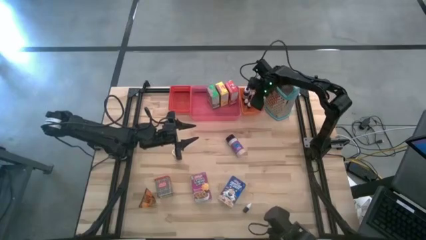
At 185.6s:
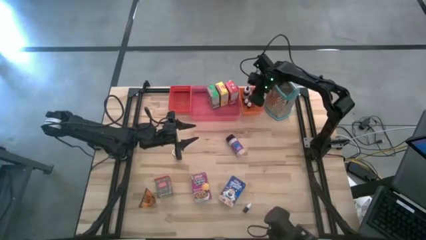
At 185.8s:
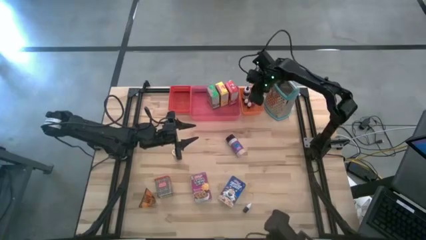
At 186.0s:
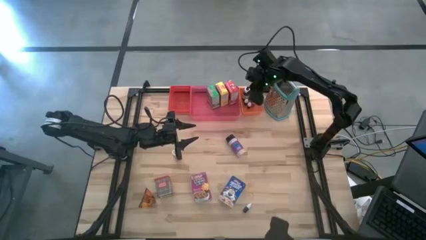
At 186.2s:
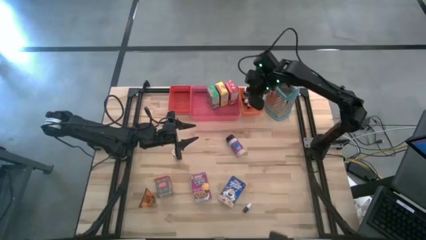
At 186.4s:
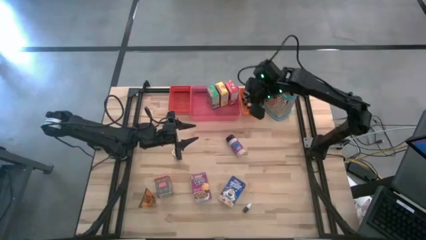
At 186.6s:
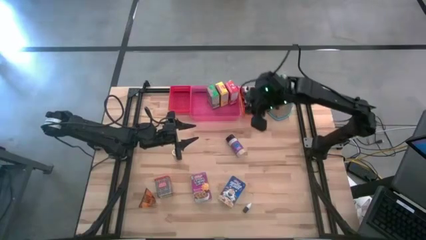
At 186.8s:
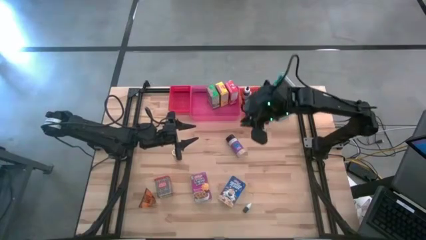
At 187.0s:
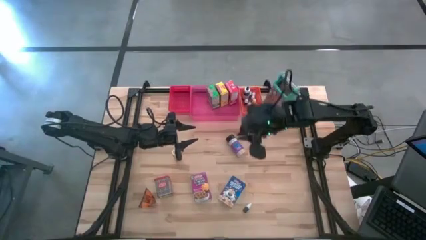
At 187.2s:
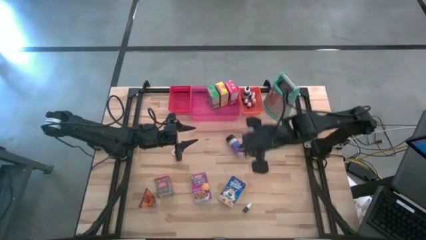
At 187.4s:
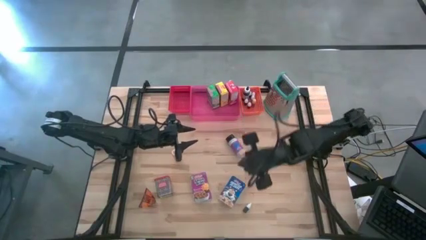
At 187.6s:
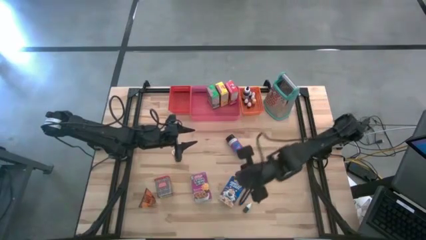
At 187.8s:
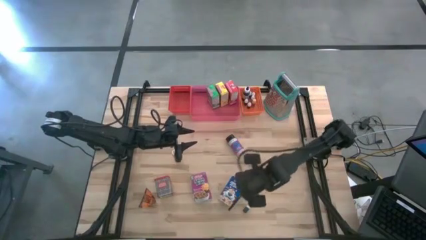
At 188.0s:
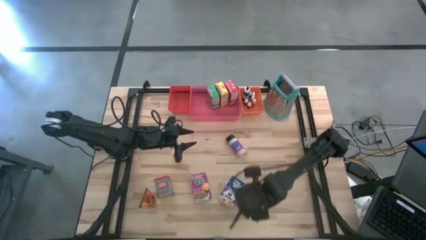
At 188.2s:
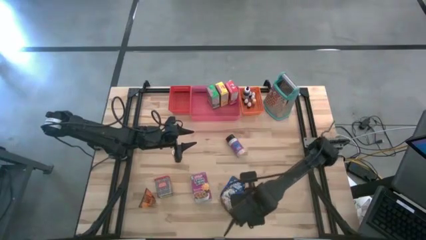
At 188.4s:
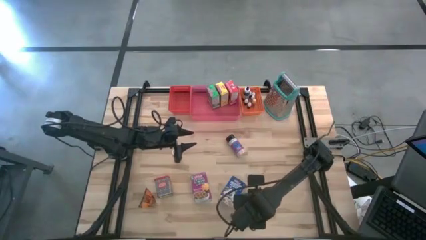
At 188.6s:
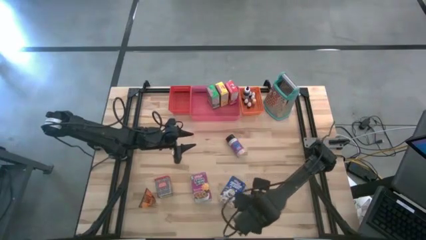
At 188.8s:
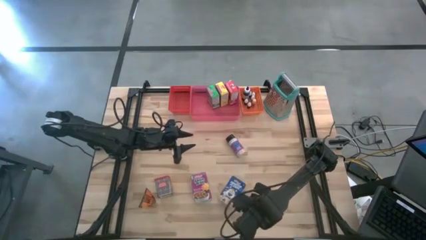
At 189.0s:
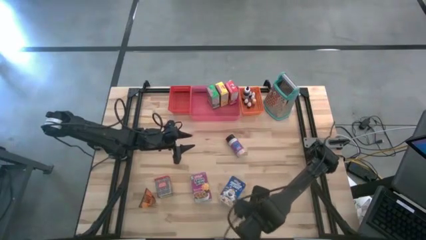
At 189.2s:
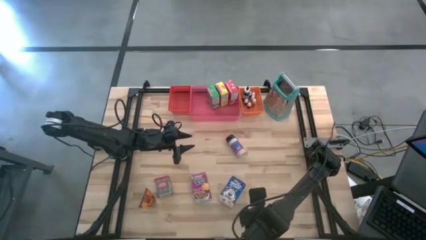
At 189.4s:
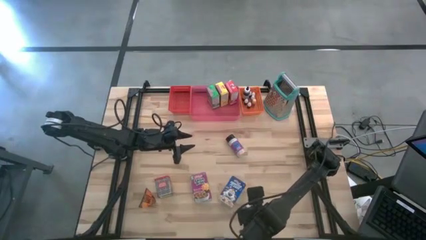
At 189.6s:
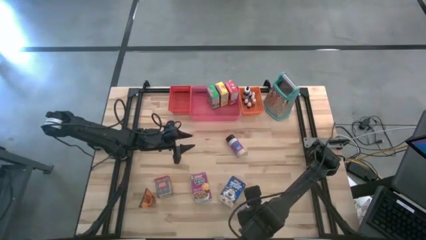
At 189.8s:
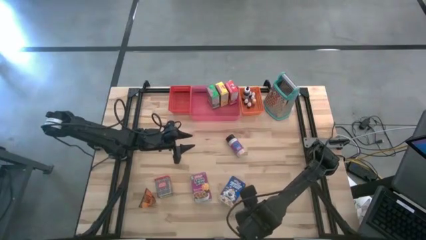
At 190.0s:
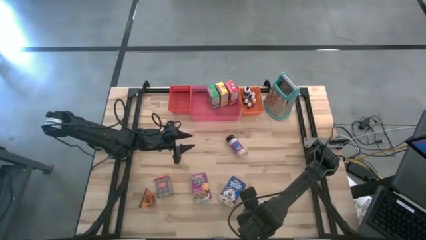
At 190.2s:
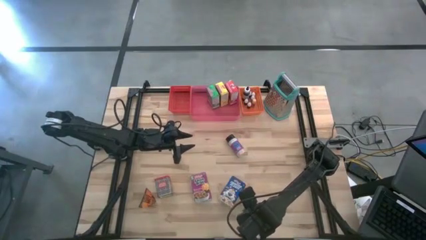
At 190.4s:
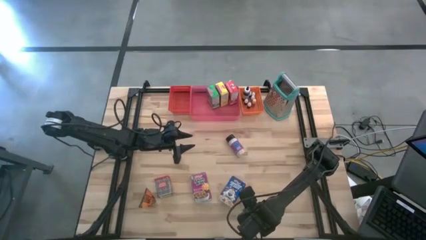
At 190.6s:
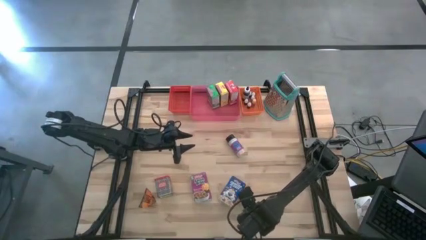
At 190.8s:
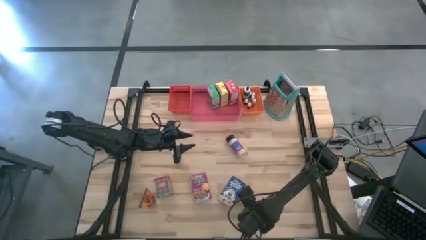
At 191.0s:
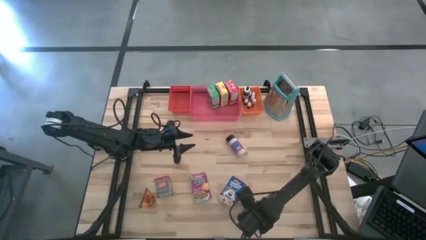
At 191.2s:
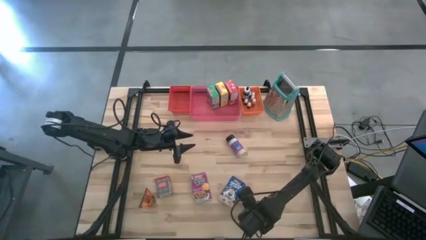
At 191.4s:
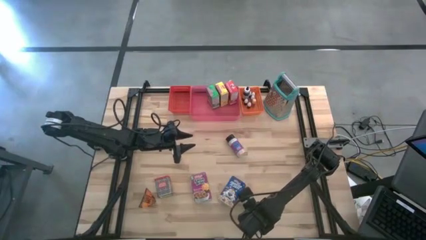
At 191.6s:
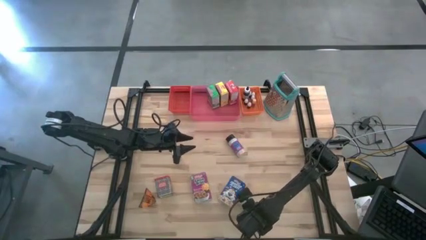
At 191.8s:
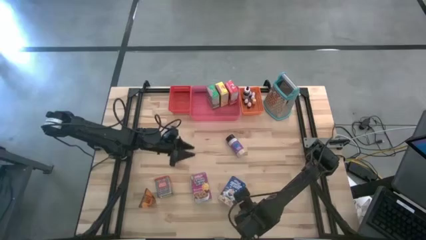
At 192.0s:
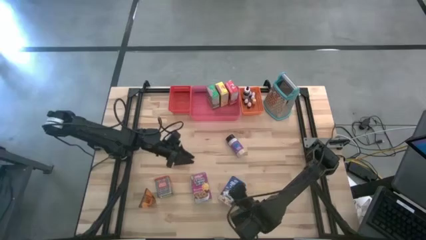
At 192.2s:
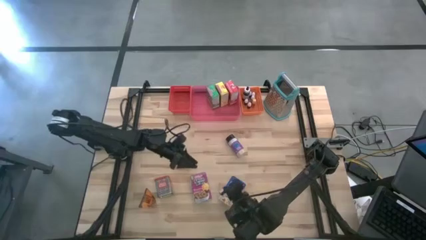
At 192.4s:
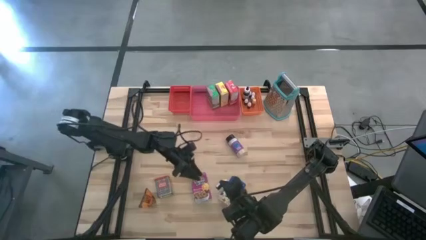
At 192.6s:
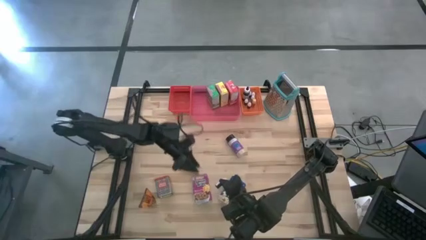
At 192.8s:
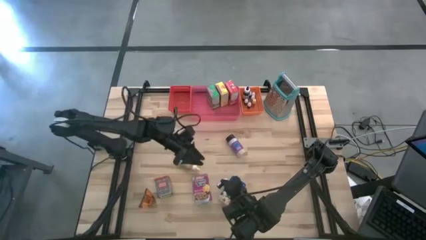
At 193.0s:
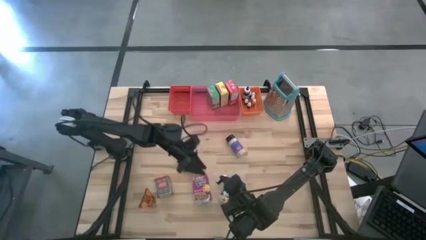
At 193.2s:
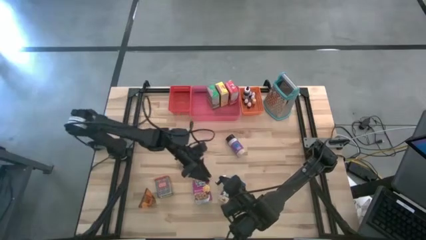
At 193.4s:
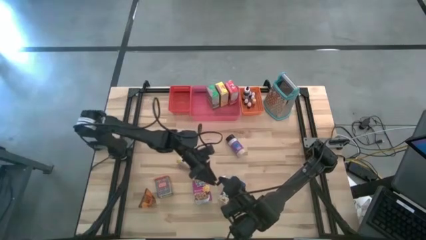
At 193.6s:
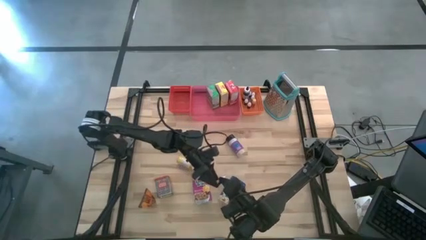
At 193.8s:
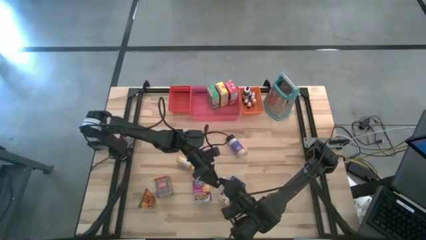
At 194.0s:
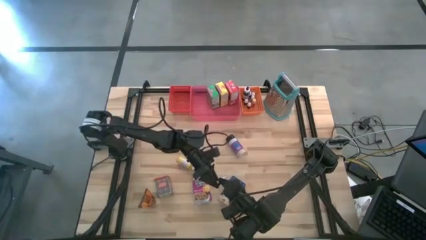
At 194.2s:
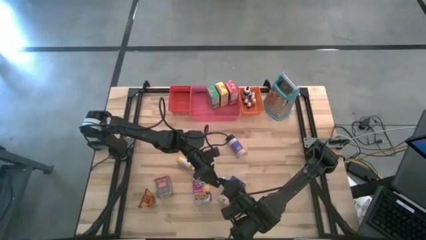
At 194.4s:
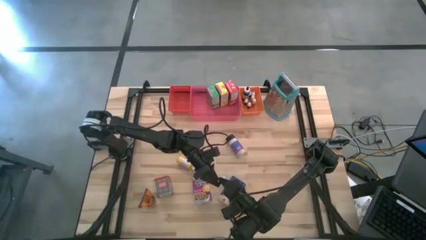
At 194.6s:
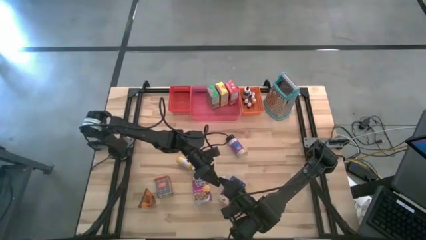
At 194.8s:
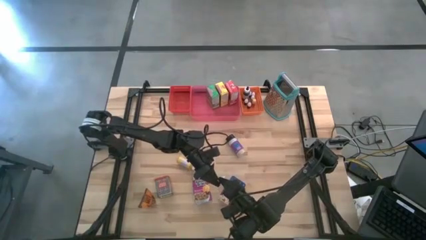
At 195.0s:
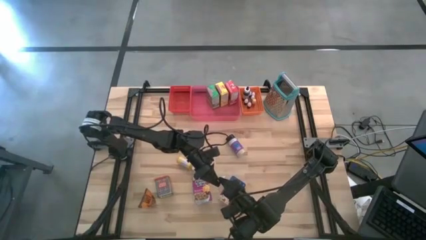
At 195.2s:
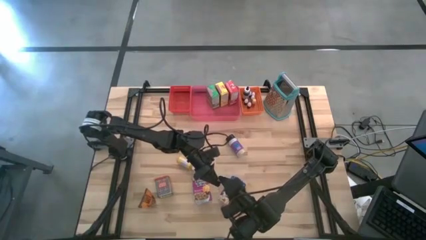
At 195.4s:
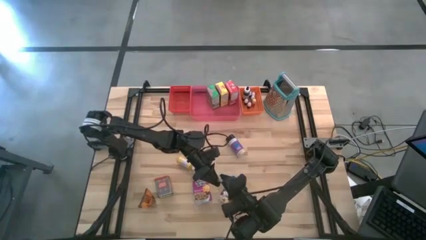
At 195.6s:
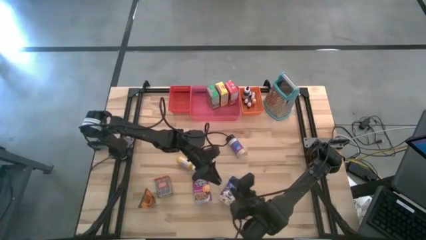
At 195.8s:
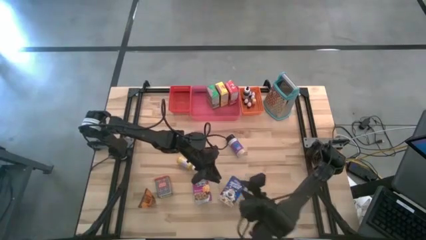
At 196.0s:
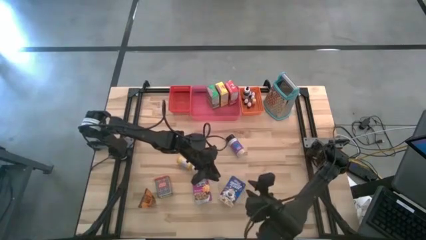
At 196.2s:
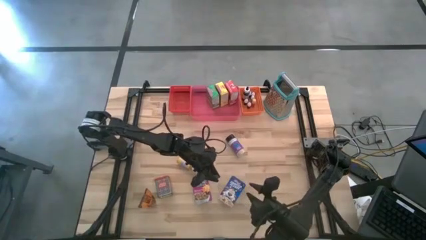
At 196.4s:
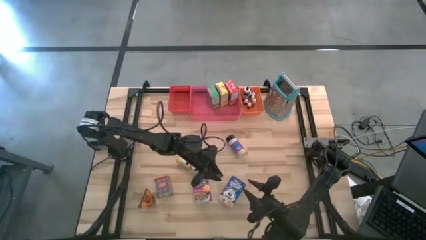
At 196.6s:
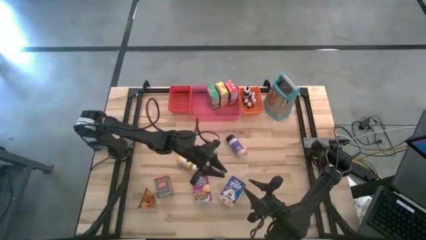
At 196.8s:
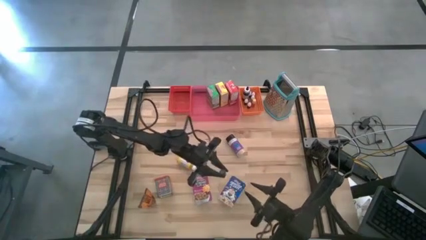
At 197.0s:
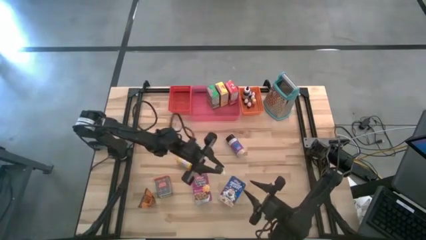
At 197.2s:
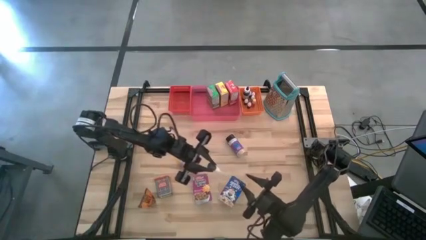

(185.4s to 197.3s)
Task: Pick & Place Kitchen Items
Put the brown food coloring bottle into the orange bin
